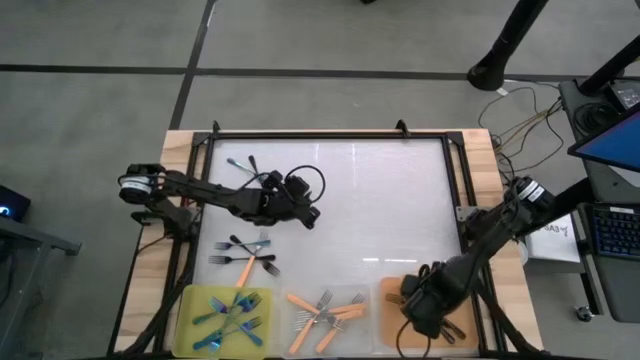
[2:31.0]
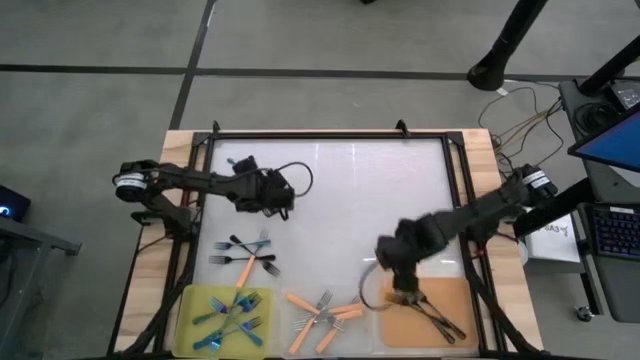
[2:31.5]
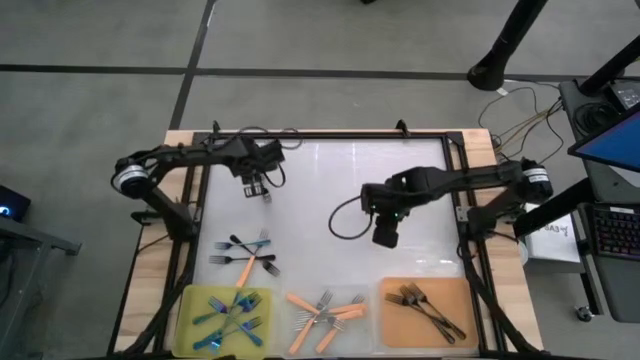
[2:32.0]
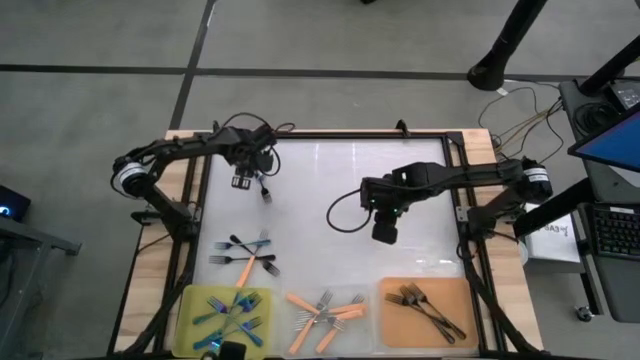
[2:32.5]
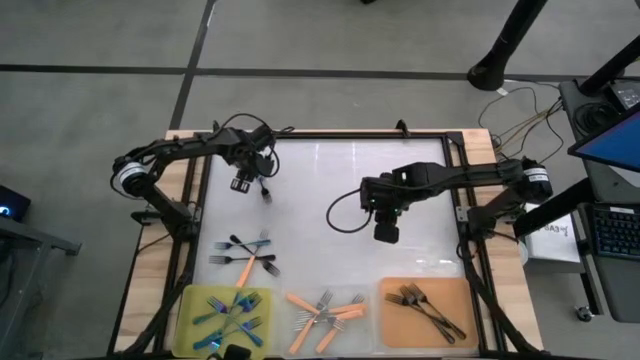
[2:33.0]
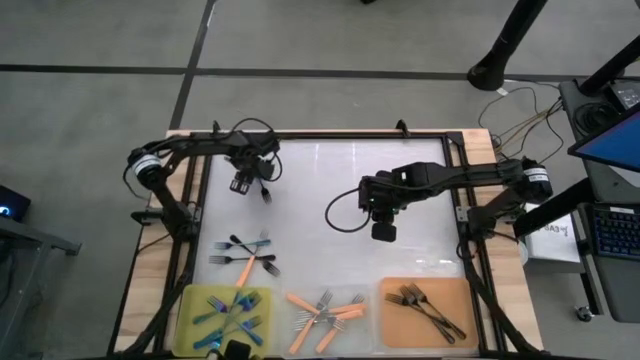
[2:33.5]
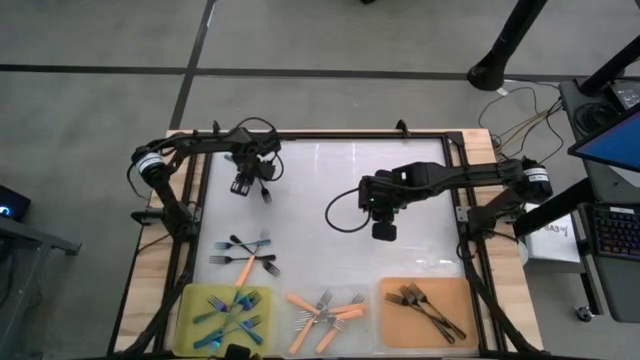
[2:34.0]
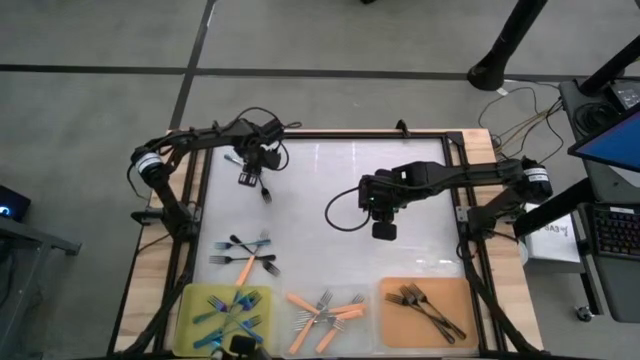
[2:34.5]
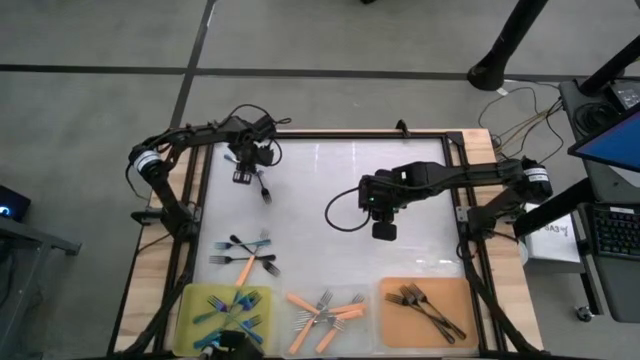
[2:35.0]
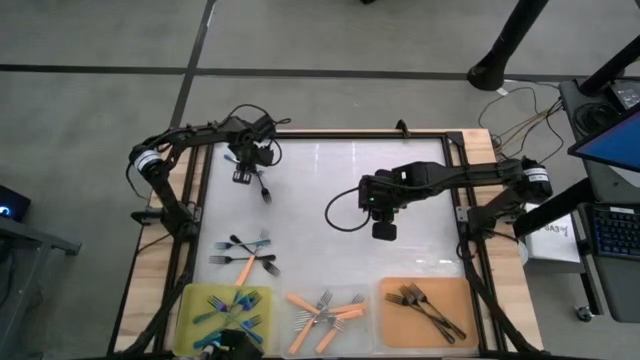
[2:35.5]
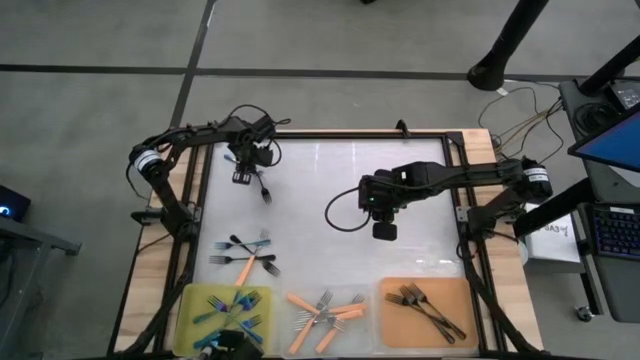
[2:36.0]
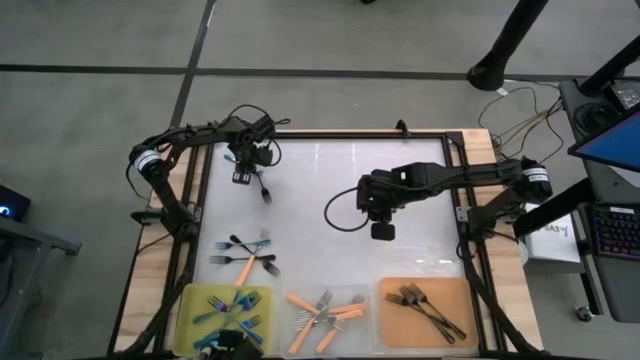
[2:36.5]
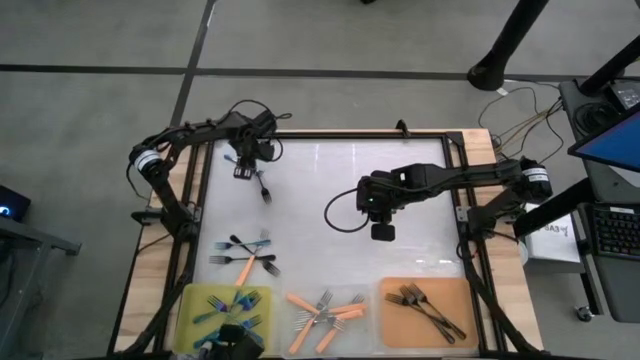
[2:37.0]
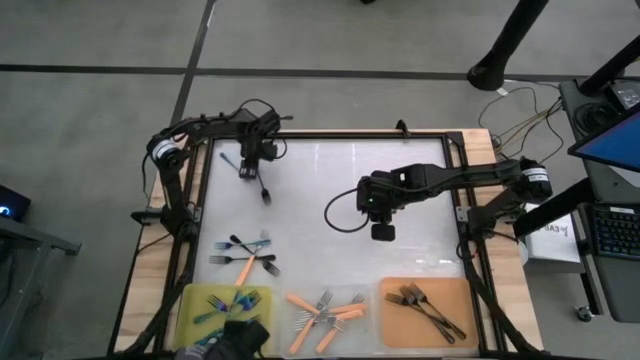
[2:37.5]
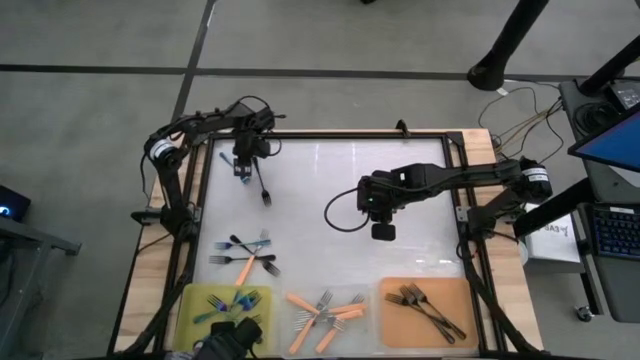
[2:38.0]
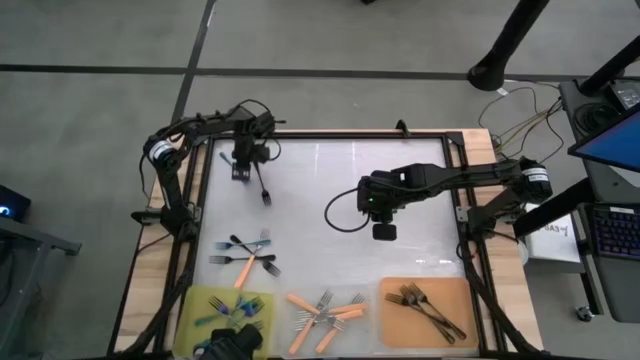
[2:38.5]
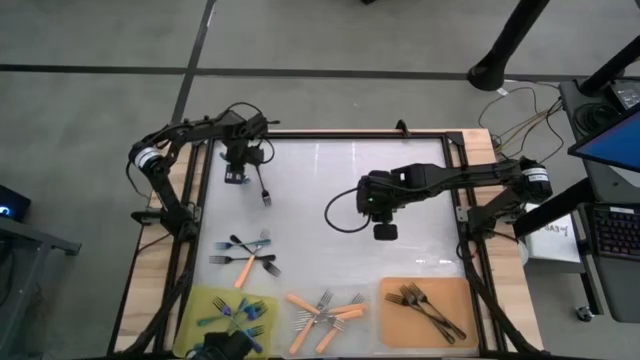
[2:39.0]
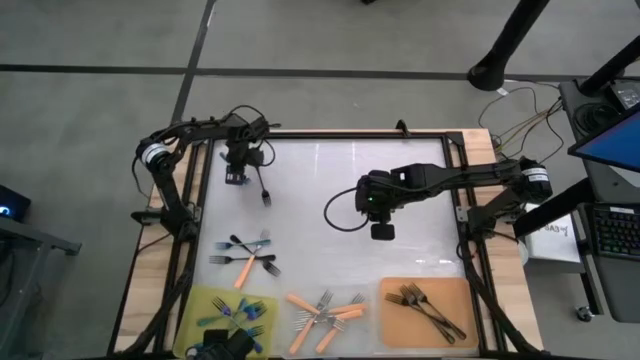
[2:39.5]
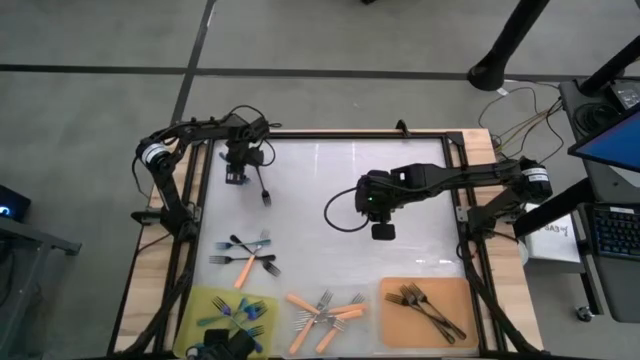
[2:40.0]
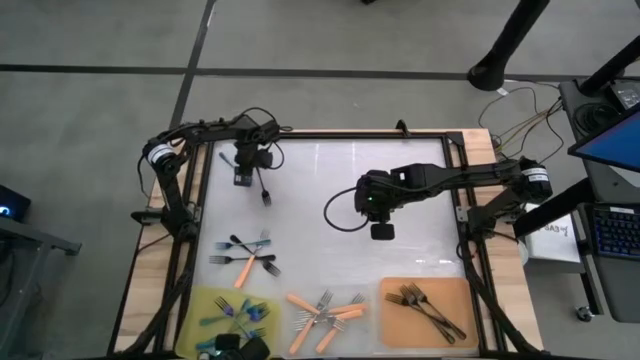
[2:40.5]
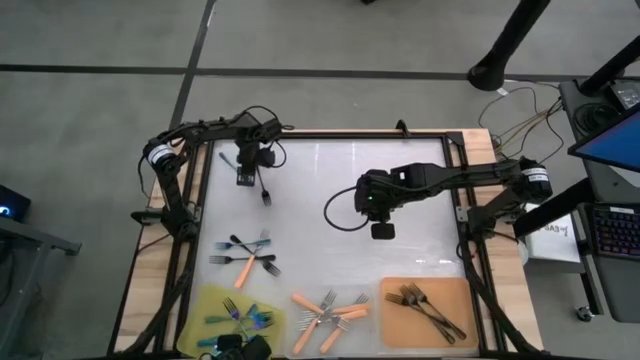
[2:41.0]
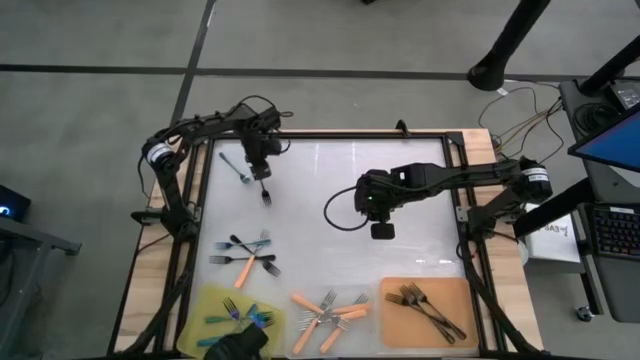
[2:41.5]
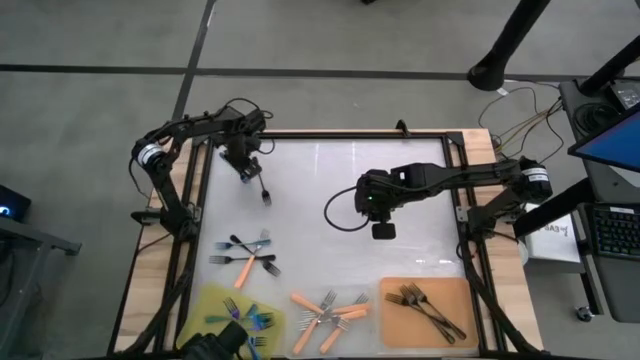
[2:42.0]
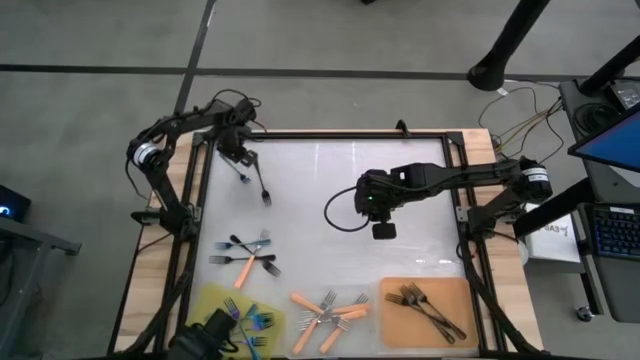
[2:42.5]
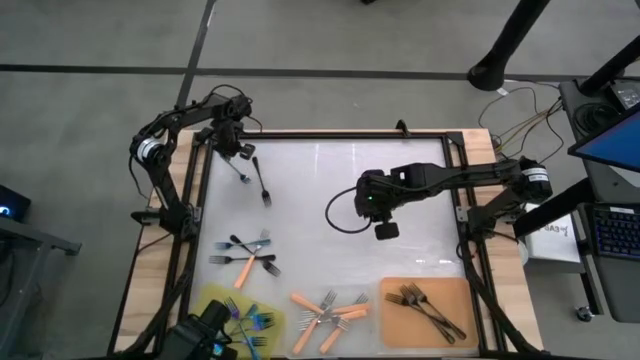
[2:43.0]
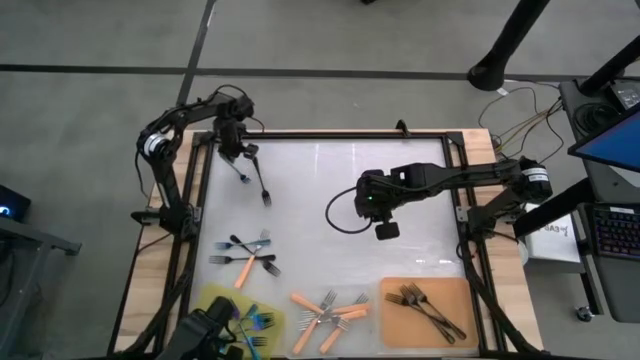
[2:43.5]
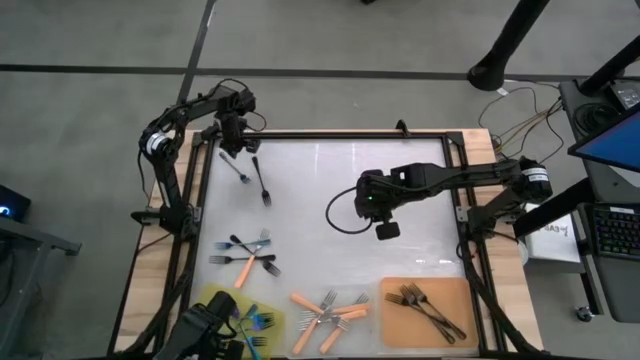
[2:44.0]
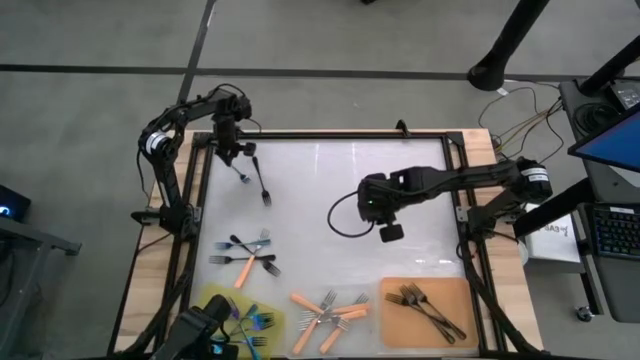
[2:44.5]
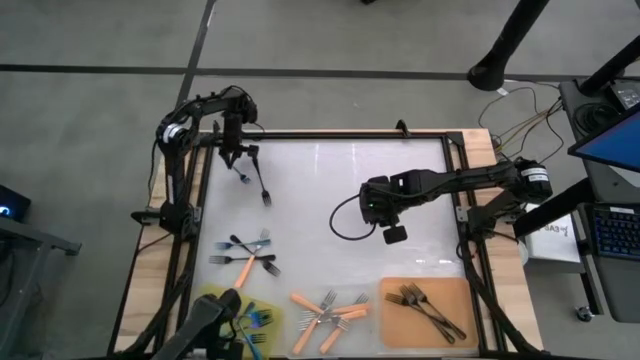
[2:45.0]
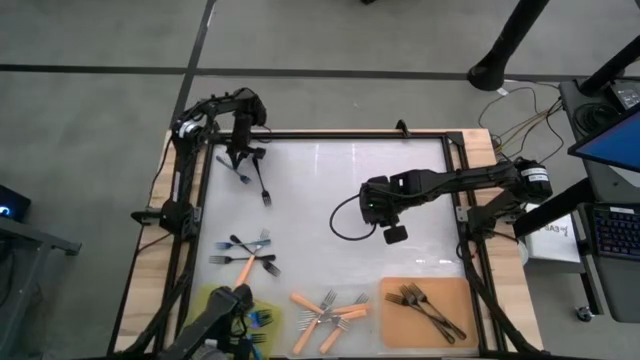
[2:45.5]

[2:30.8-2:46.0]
Task: Sort silverware by color (type)
Put the blue fork into the yellow bin

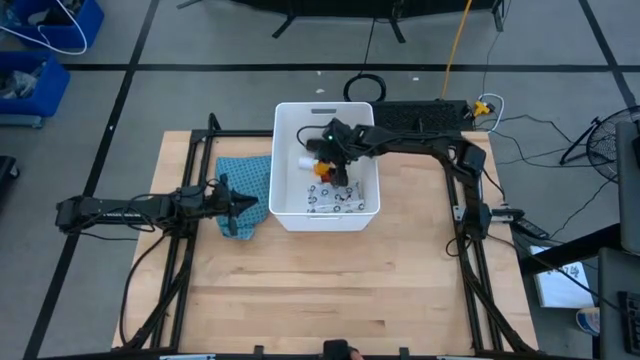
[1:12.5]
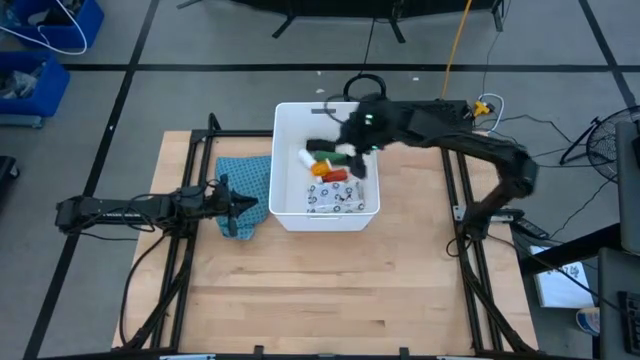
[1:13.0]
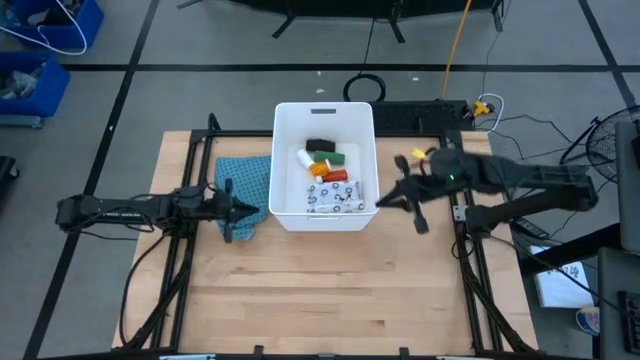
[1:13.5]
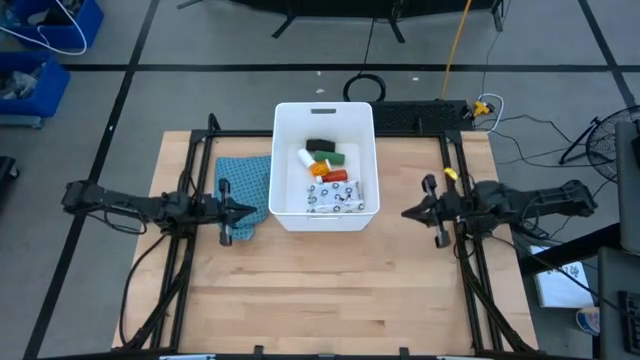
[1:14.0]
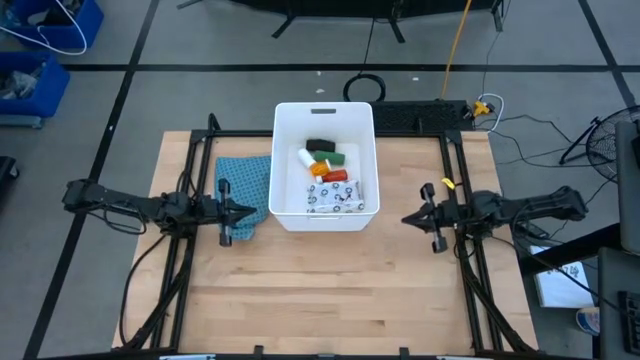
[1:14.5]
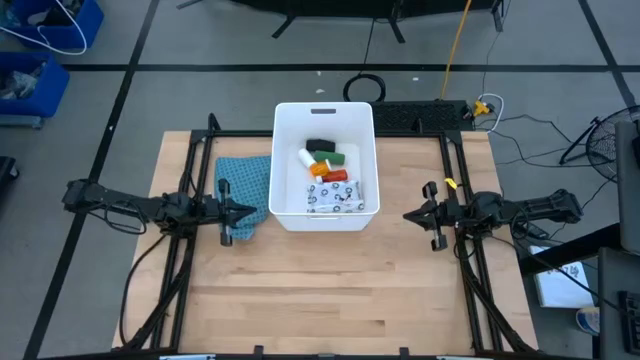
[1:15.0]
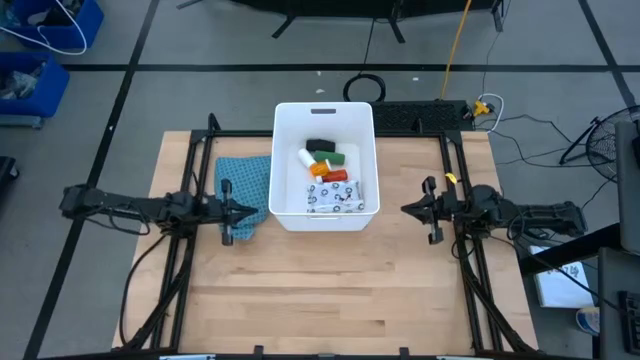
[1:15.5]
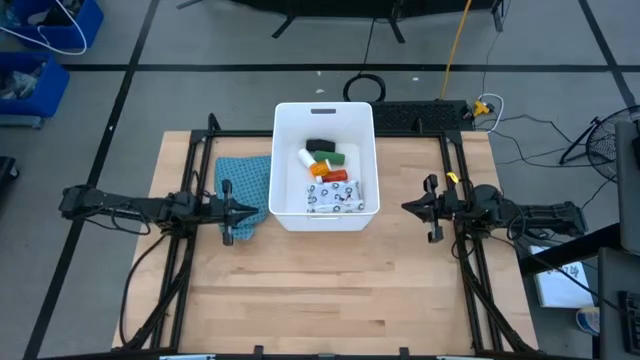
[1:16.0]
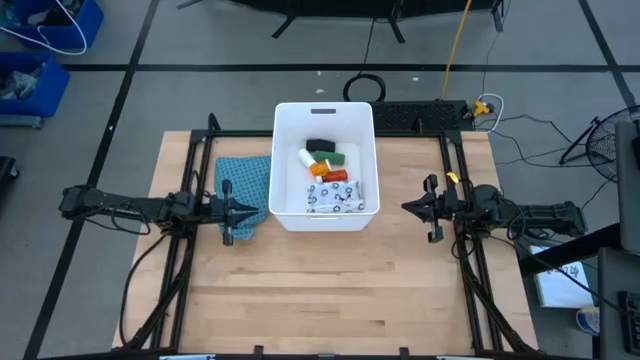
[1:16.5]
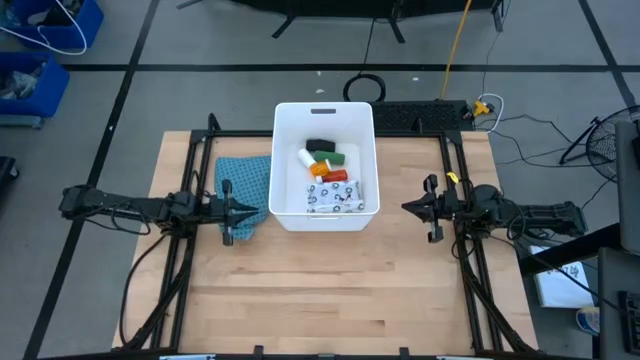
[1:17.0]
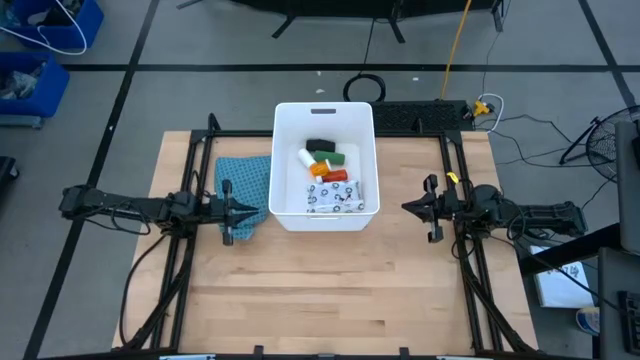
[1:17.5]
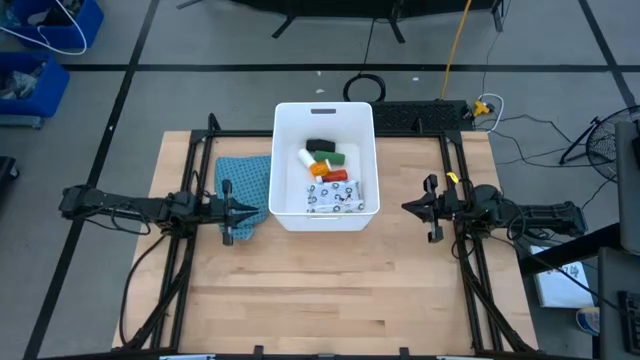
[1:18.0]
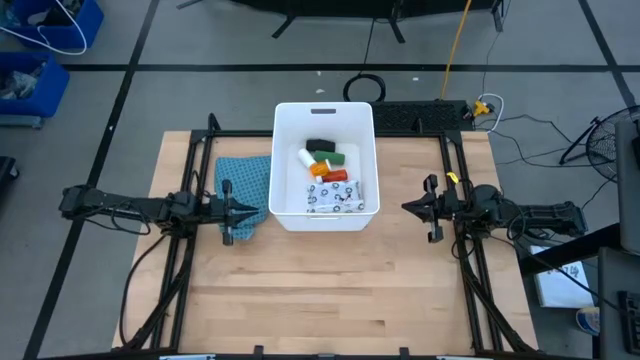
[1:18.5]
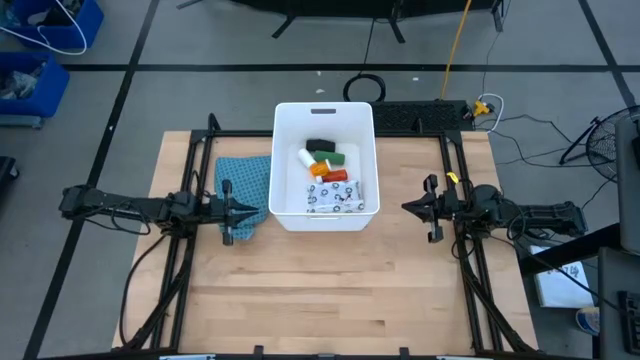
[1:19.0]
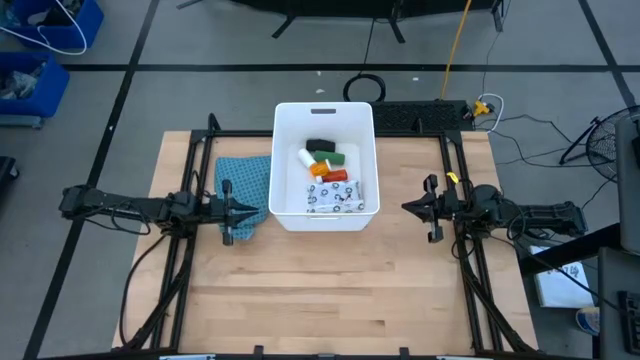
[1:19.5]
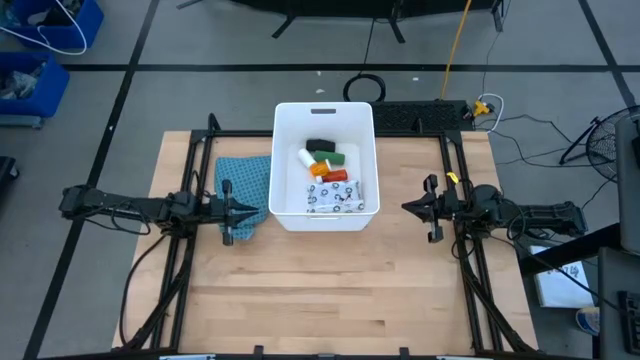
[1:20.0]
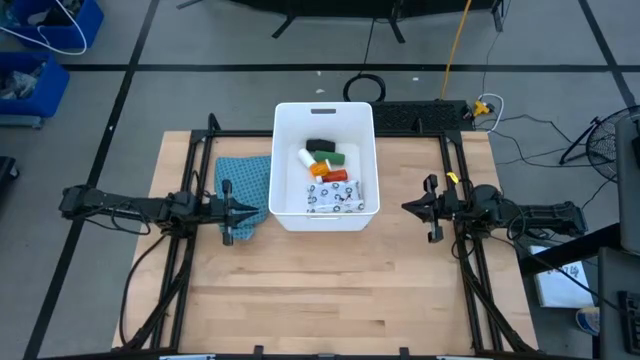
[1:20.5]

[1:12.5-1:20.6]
Task: Pick & place medical supplies in basket/bin
Return to Home Position
